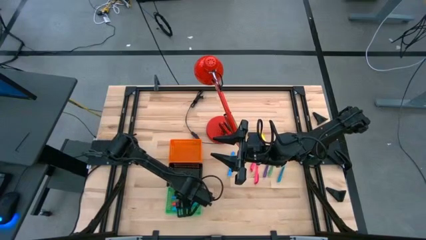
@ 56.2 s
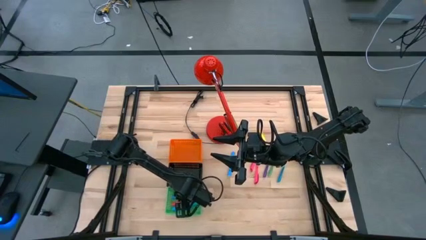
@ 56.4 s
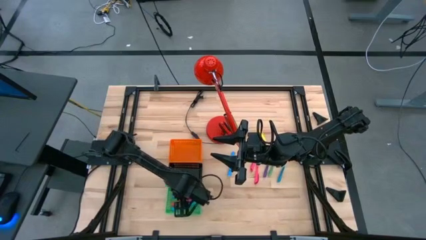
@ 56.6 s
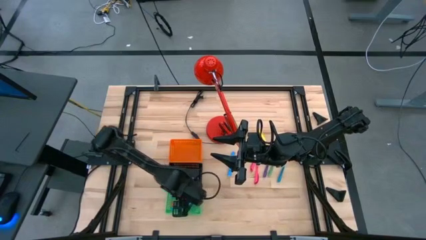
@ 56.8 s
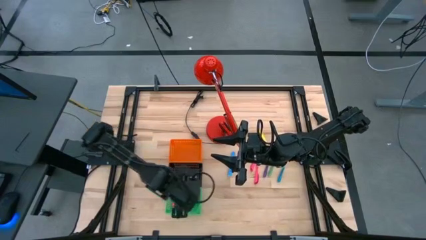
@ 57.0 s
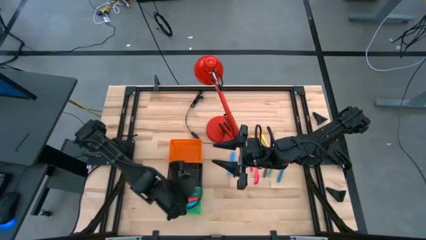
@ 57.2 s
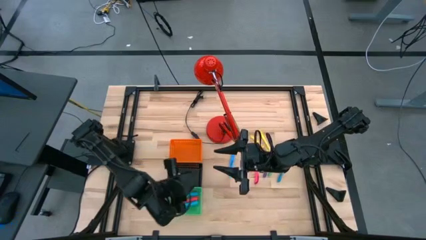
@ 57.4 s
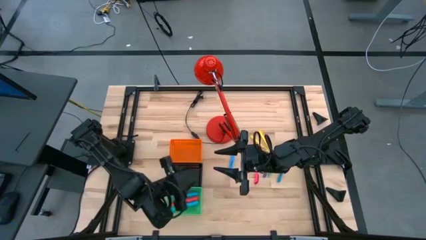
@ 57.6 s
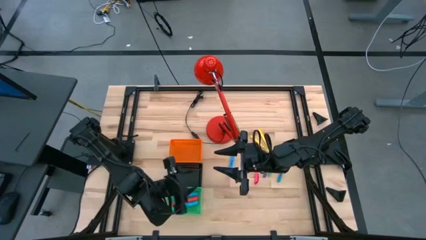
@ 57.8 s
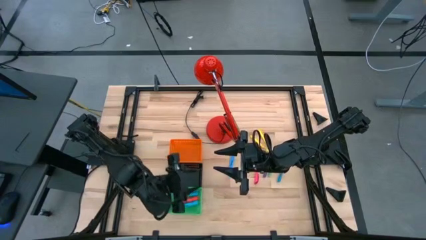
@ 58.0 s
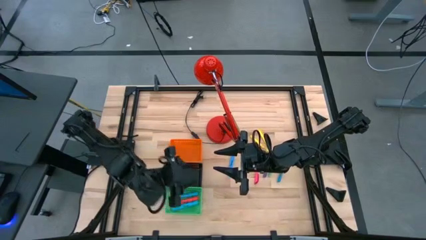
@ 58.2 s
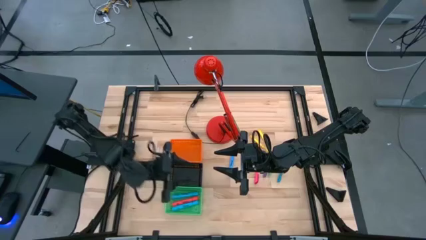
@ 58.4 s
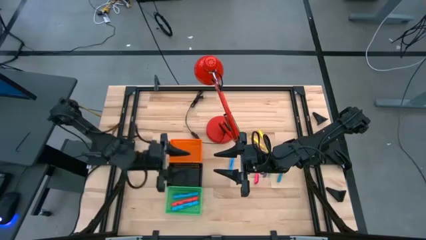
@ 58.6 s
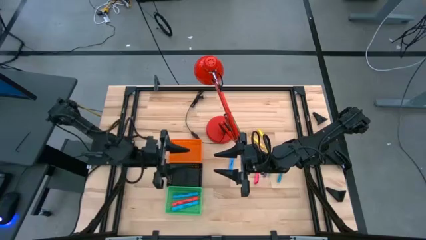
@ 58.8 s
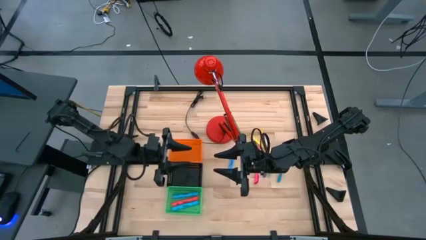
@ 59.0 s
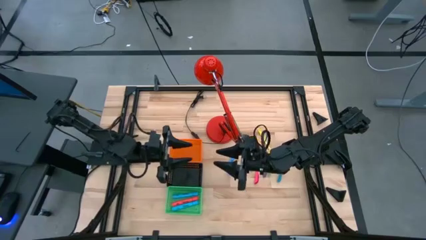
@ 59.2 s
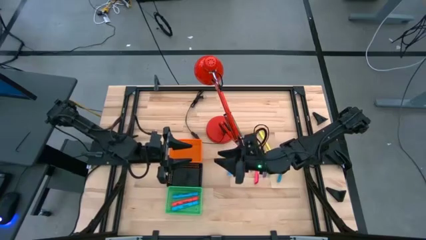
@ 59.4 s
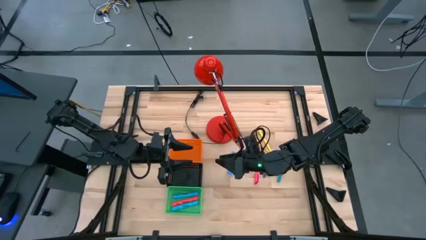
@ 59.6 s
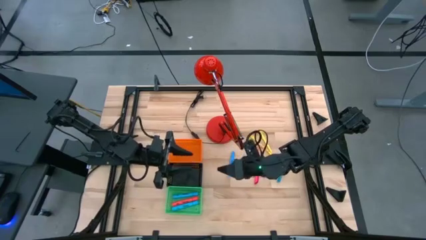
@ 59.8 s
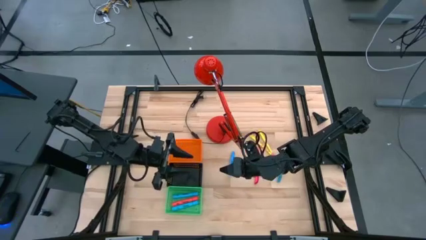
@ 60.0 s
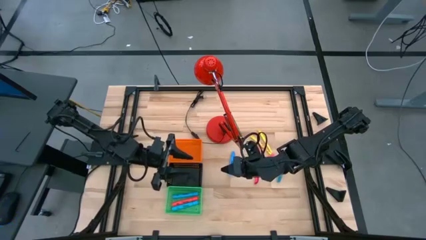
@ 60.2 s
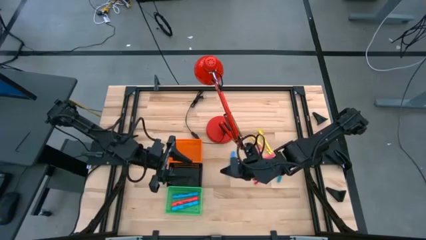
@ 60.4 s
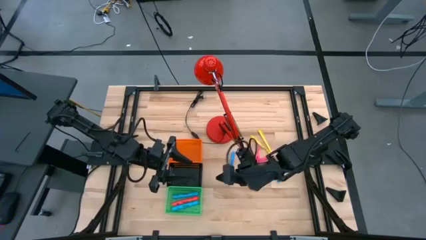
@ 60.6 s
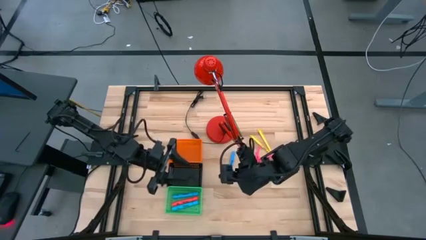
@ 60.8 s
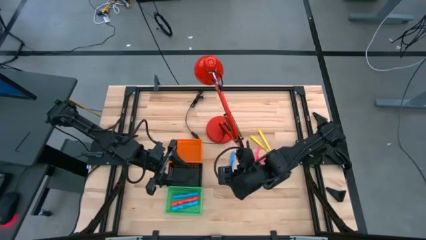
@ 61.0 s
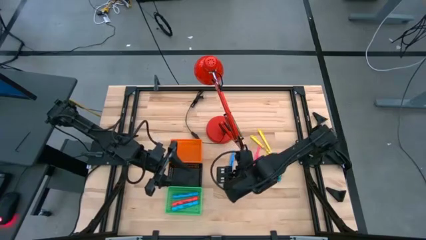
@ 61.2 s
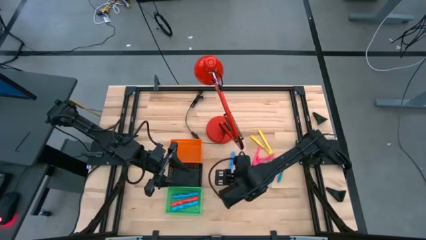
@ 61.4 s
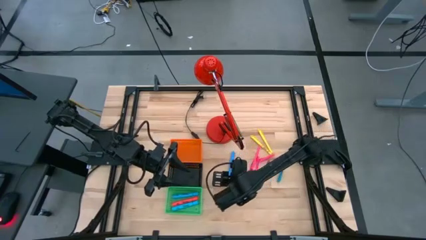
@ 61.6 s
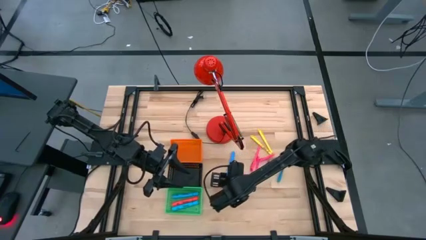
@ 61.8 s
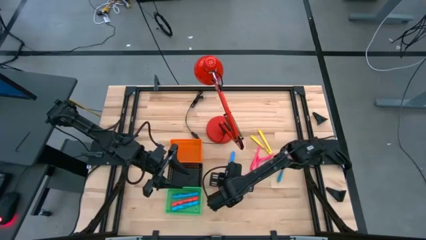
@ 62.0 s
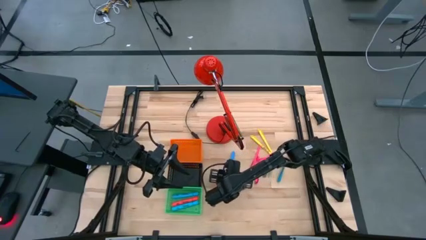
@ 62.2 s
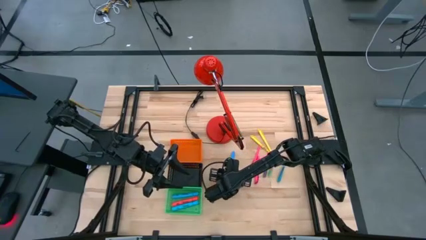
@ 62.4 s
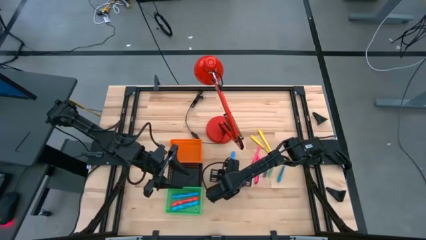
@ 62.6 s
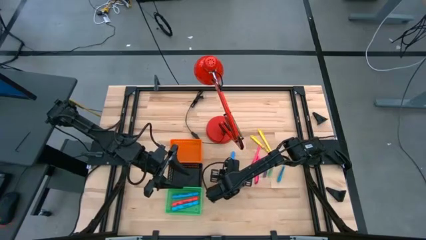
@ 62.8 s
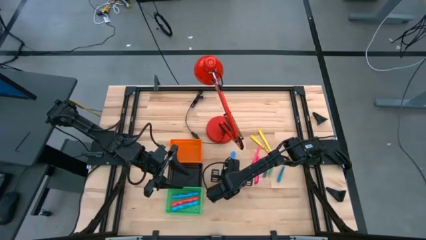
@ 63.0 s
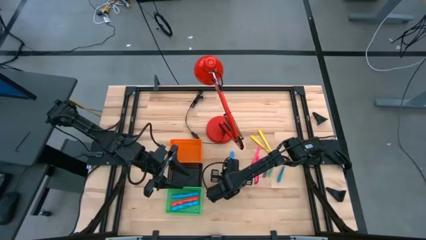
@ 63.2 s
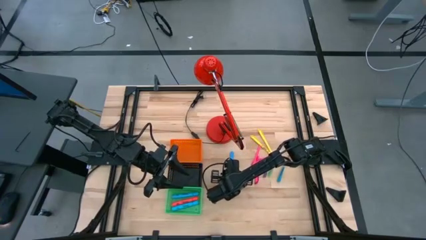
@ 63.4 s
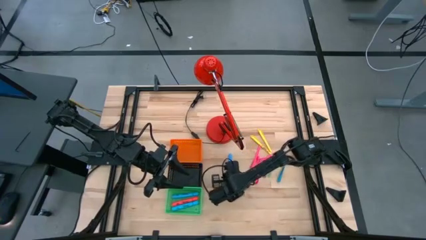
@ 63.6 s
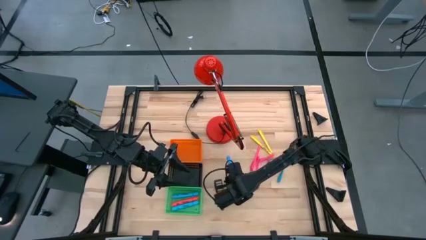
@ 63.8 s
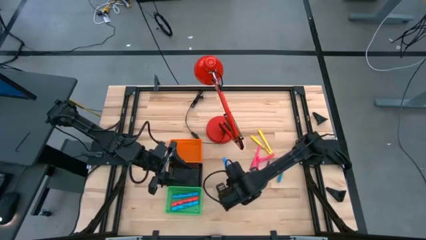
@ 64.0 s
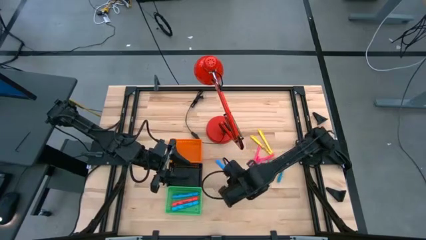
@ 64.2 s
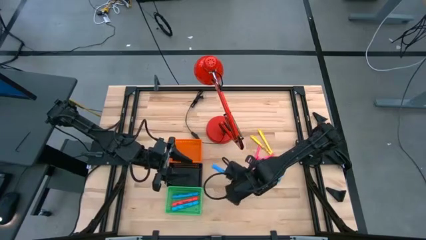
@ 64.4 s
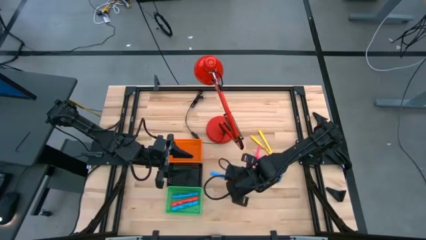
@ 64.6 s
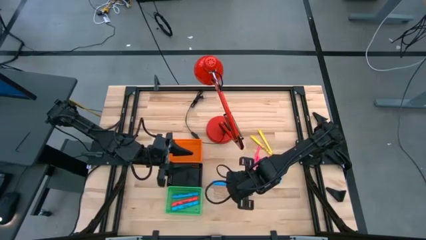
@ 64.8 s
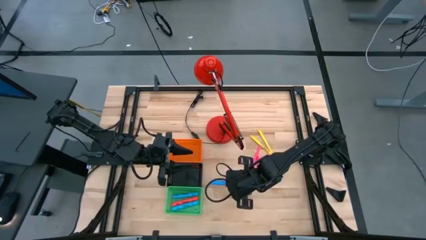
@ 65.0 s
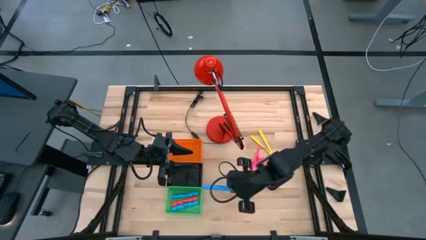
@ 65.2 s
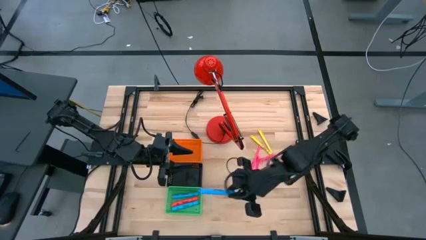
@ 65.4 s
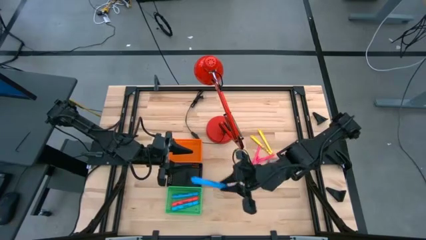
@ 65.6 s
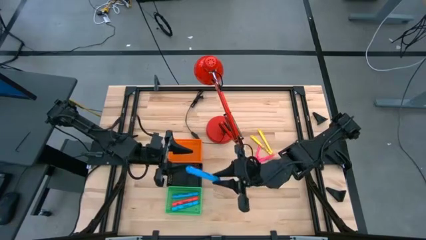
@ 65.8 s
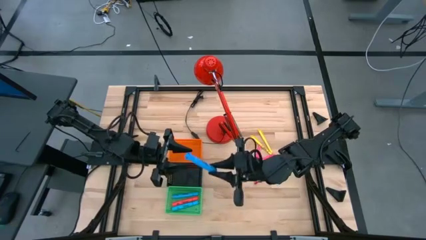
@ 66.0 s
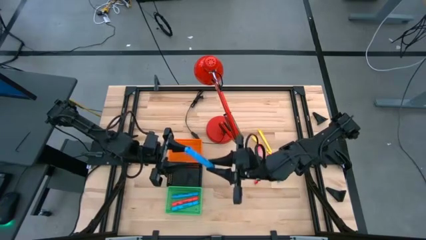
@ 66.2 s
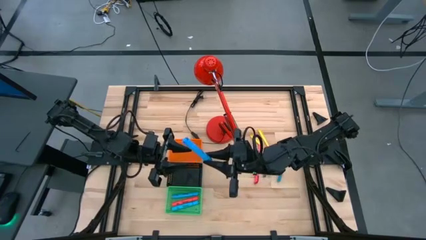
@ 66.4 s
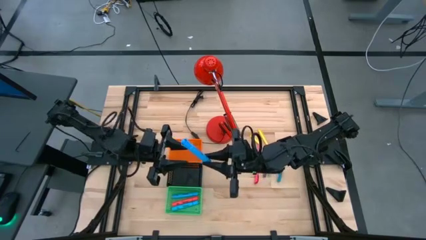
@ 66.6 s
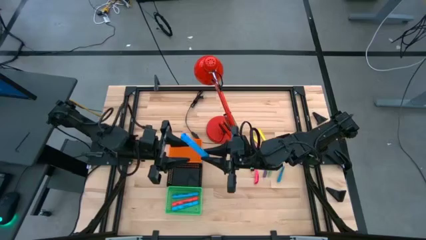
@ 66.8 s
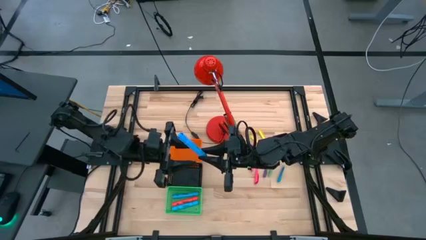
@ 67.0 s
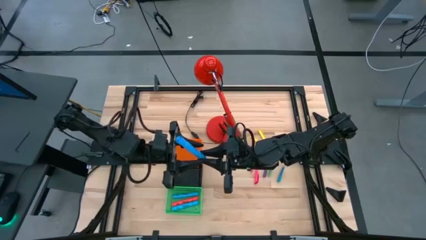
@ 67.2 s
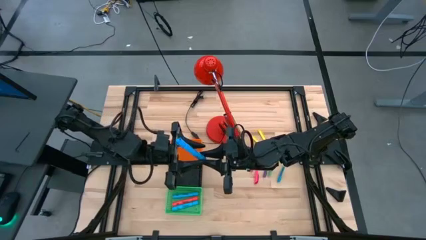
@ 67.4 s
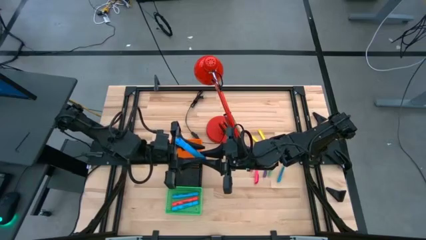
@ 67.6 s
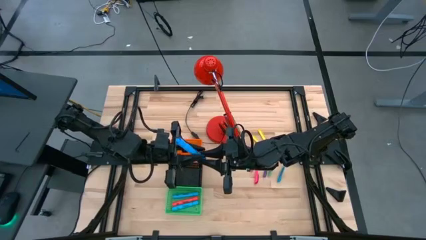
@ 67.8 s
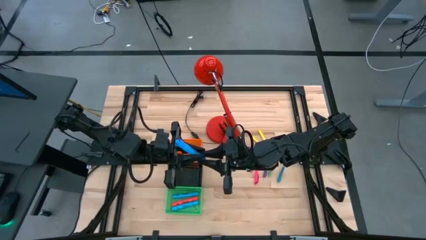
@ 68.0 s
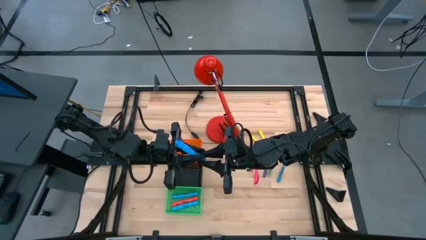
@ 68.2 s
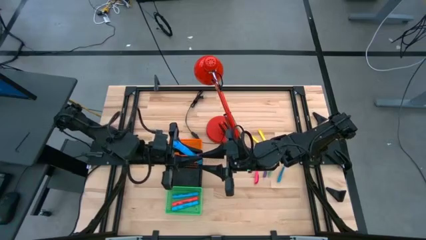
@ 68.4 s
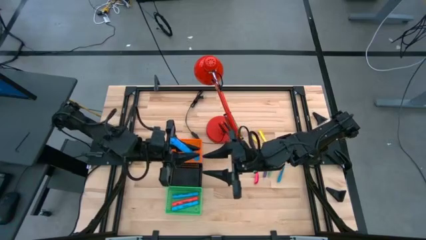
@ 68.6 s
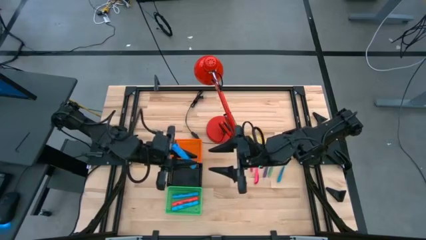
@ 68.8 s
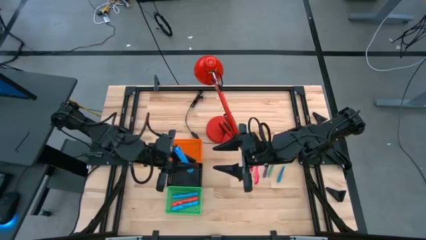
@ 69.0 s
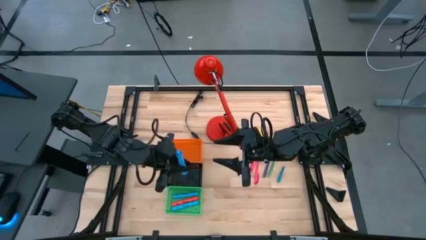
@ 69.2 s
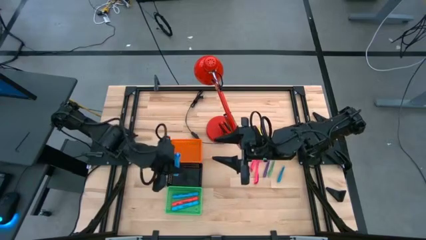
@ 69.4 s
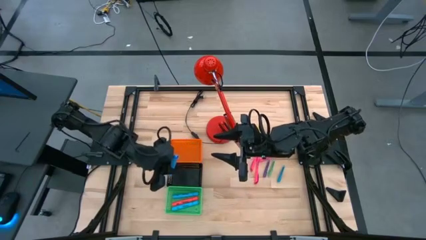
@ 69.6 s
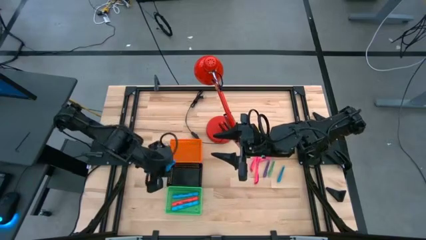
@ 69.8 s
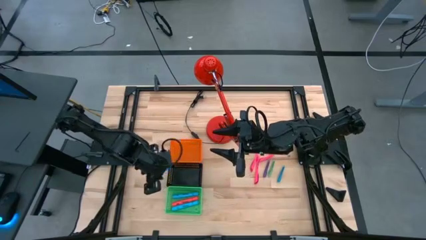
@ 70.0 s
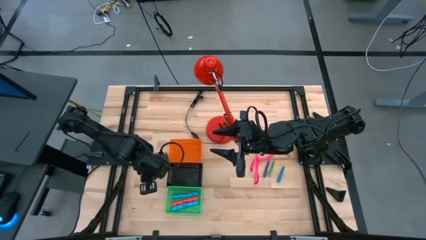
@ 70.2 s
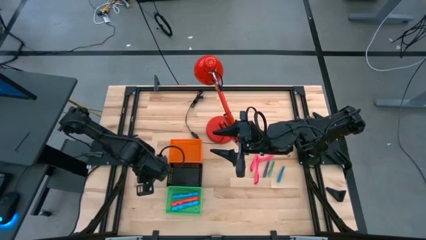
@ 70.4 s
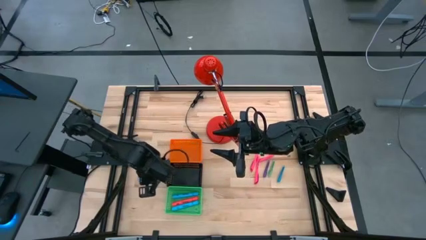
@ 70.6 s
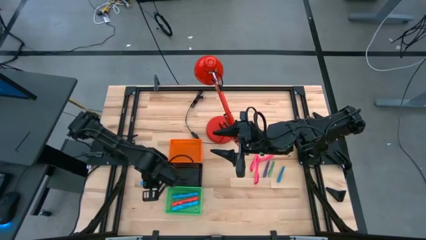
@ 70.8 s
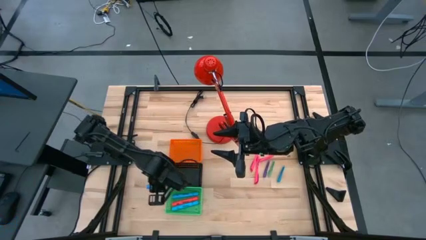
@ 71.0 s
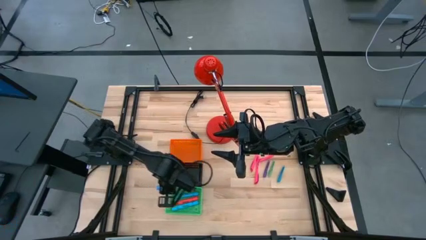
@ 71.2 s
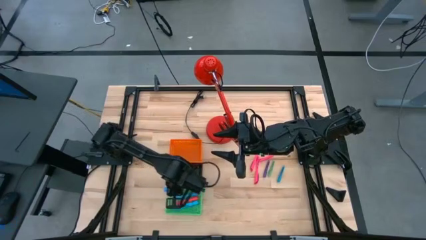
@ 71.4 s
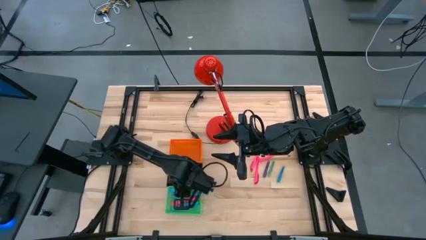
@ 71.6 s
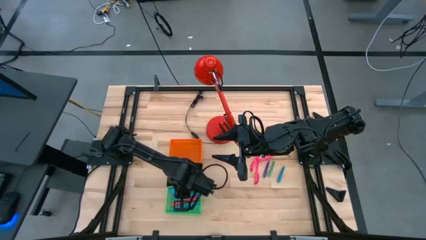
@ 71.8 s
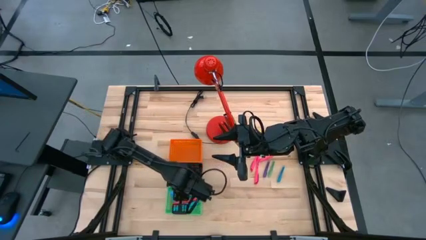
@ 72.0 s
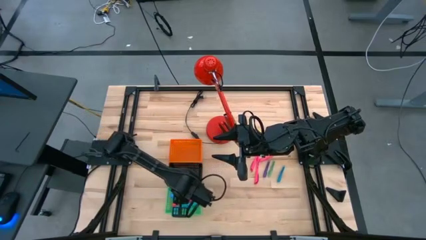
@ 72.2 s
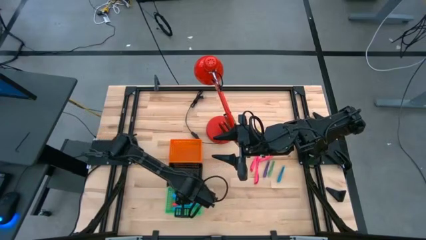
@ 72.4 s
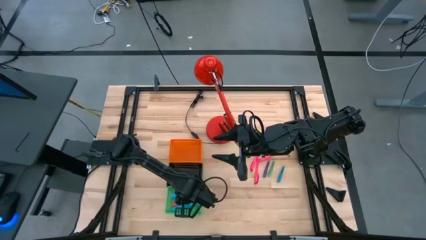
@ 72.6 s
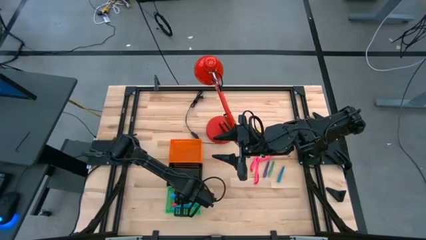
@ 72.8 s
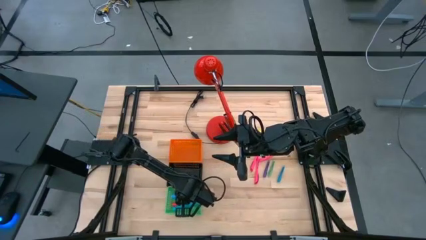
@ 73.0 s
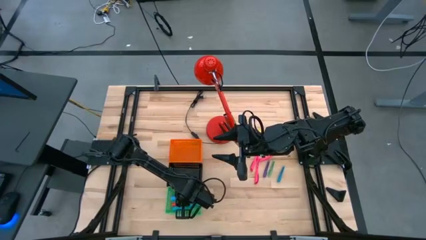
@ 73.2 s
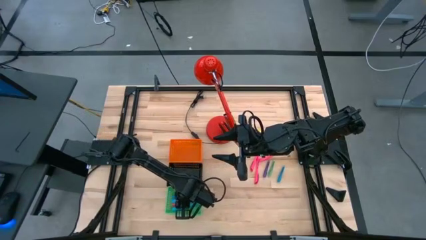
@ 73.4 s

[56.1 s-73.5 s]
Task: Pick & Place Markers
Put the blue highlighter into the green bin
